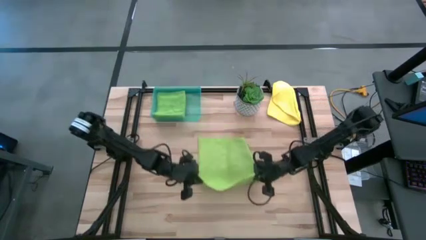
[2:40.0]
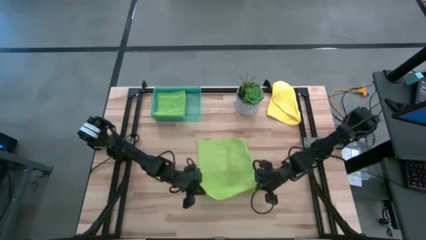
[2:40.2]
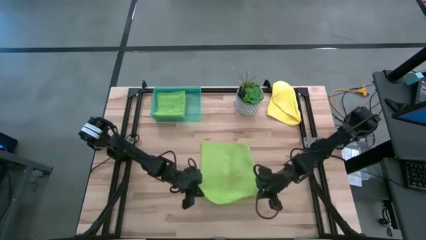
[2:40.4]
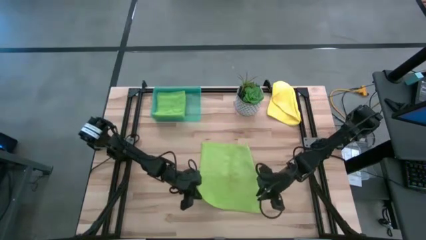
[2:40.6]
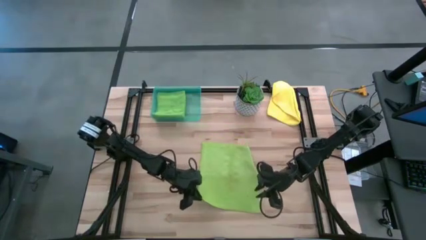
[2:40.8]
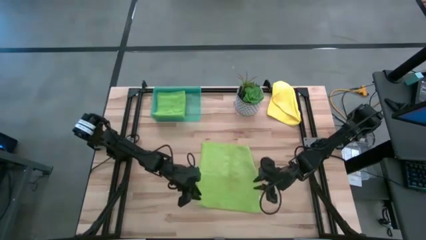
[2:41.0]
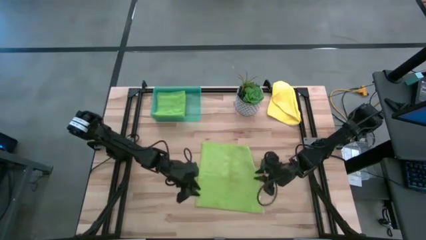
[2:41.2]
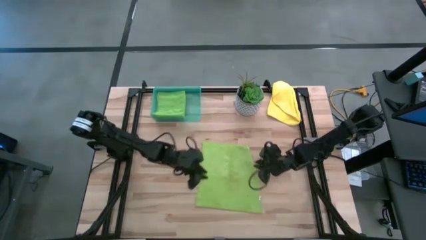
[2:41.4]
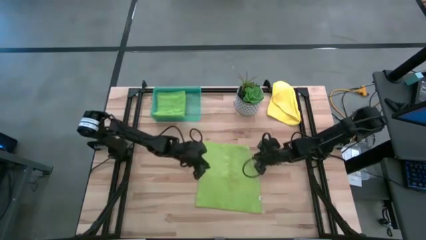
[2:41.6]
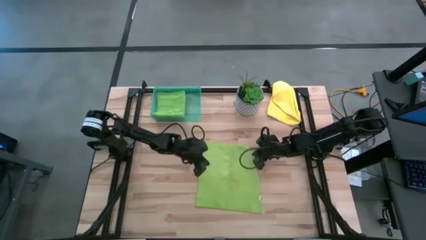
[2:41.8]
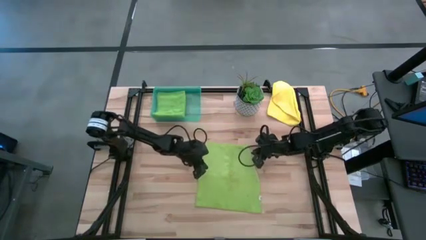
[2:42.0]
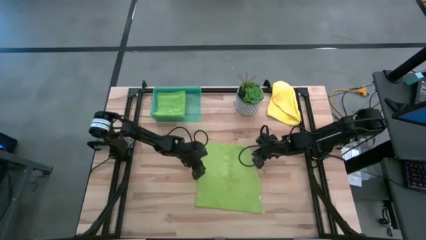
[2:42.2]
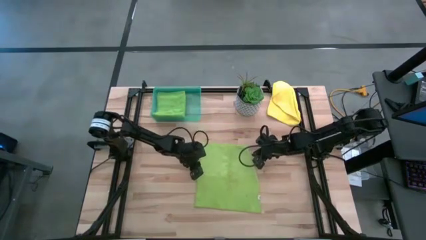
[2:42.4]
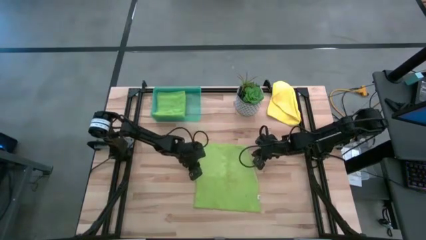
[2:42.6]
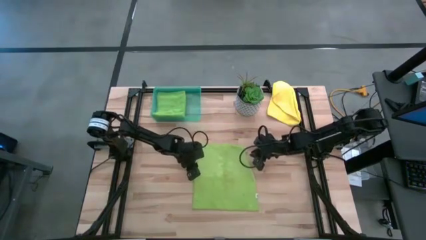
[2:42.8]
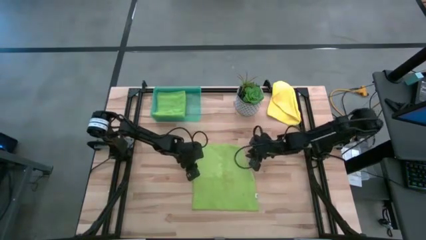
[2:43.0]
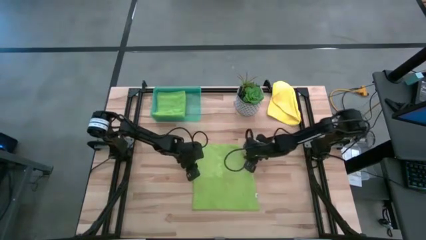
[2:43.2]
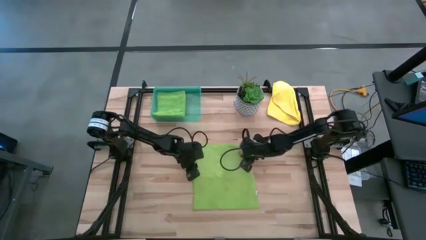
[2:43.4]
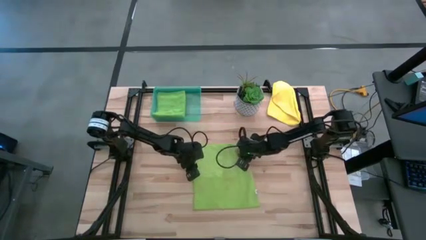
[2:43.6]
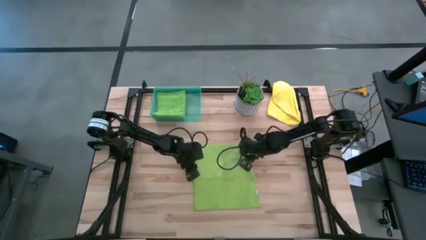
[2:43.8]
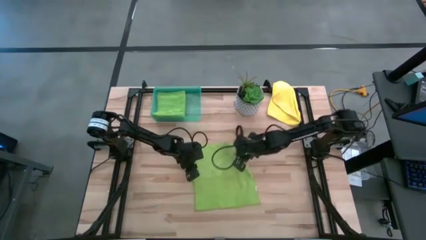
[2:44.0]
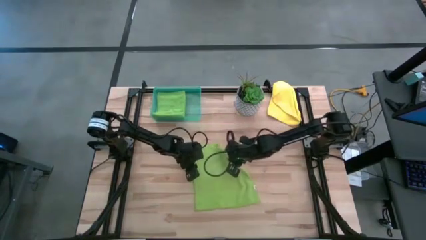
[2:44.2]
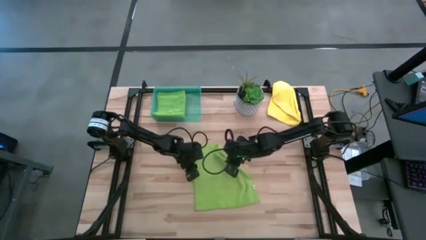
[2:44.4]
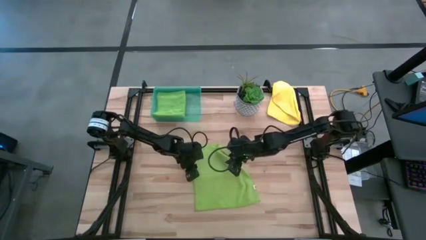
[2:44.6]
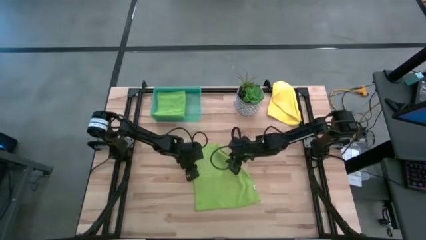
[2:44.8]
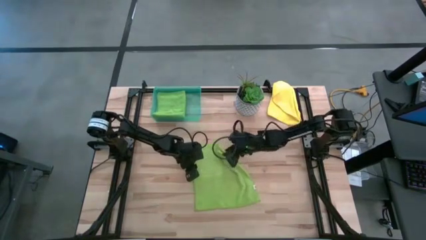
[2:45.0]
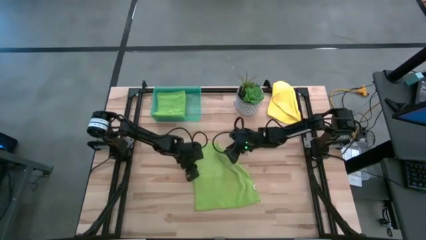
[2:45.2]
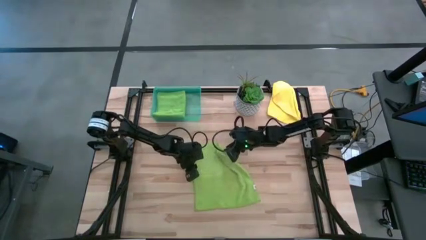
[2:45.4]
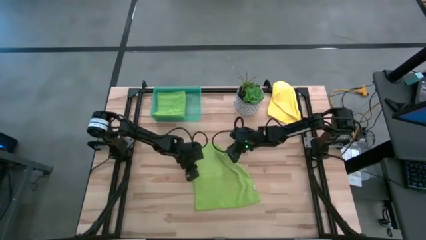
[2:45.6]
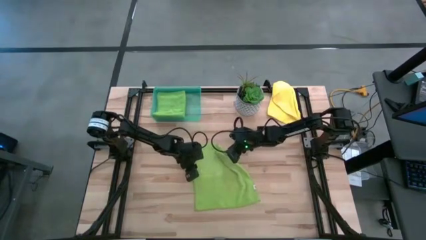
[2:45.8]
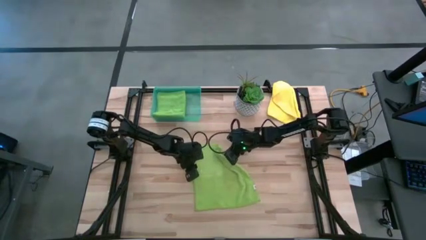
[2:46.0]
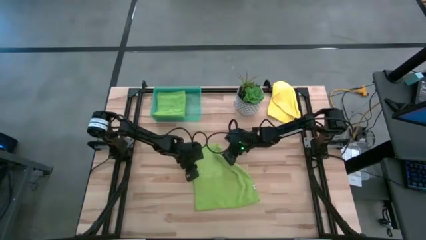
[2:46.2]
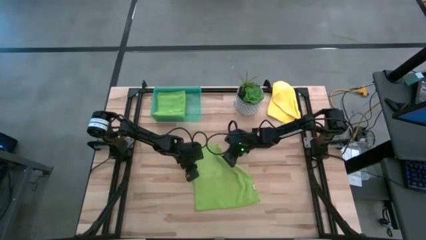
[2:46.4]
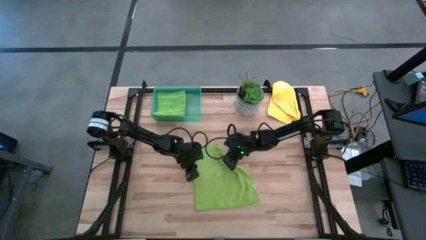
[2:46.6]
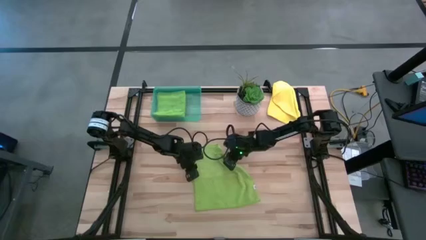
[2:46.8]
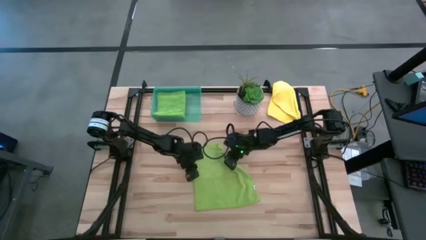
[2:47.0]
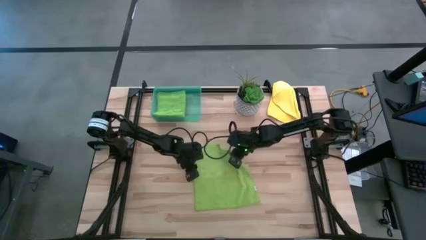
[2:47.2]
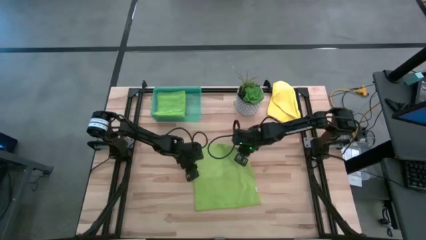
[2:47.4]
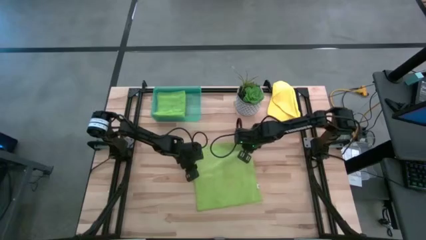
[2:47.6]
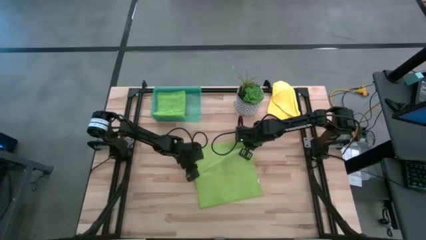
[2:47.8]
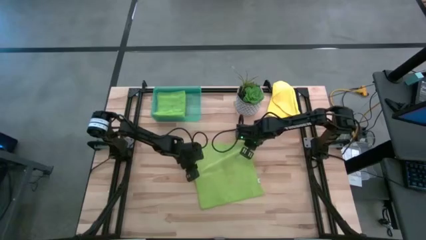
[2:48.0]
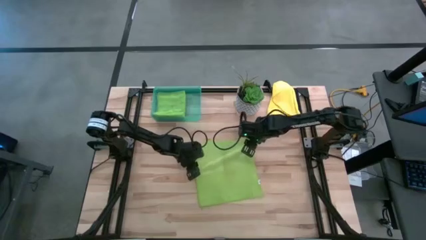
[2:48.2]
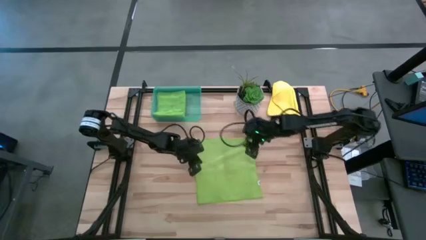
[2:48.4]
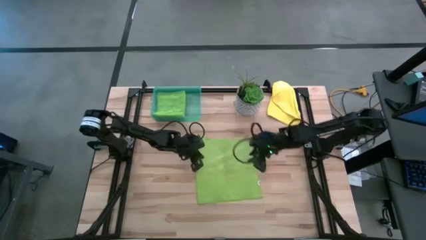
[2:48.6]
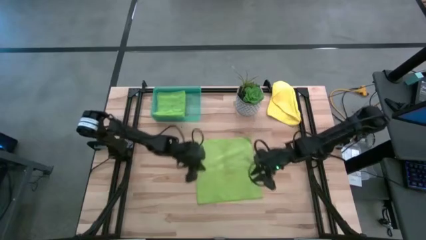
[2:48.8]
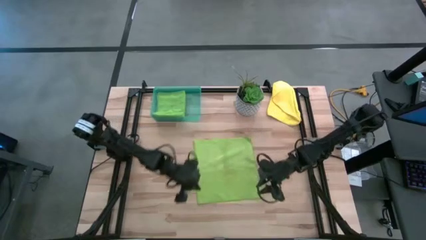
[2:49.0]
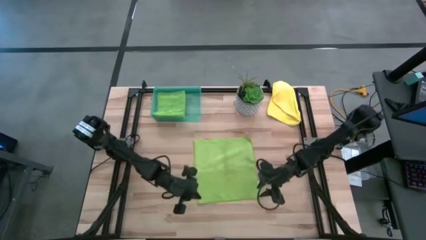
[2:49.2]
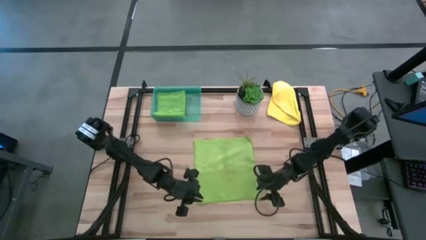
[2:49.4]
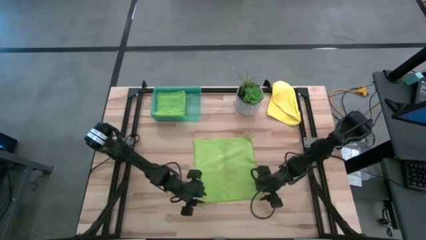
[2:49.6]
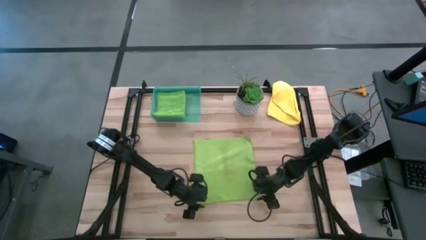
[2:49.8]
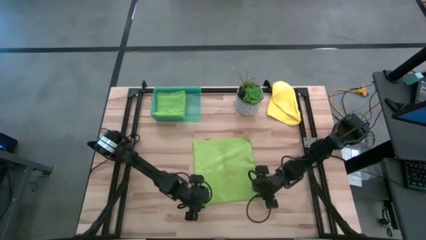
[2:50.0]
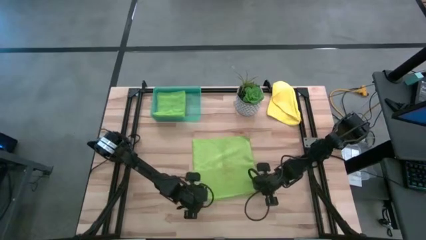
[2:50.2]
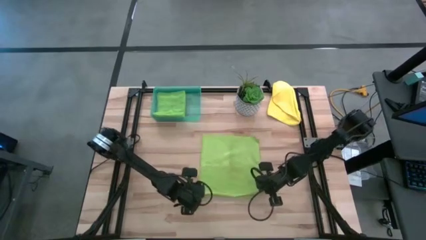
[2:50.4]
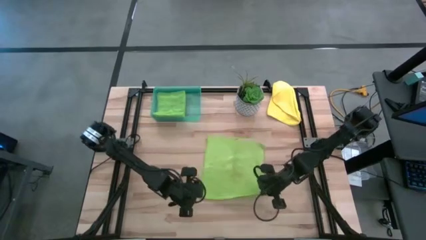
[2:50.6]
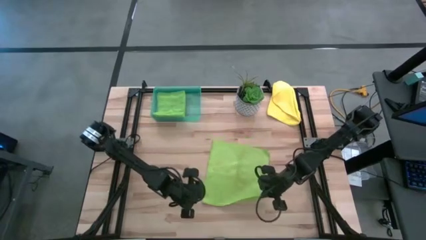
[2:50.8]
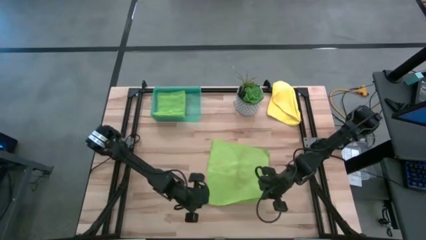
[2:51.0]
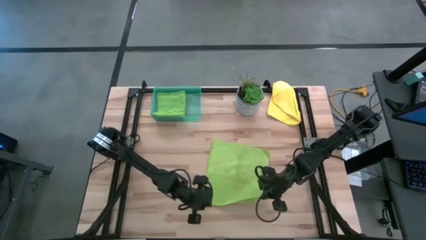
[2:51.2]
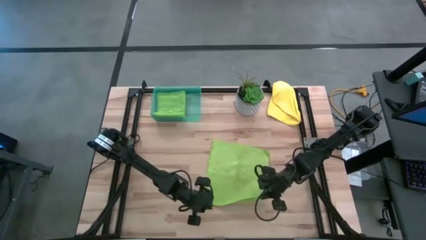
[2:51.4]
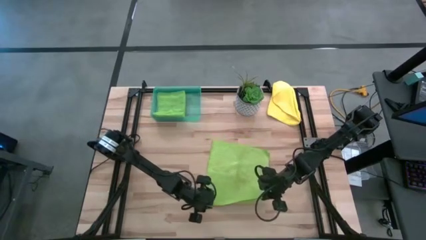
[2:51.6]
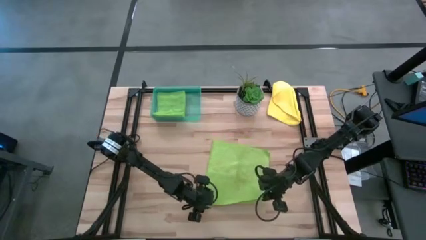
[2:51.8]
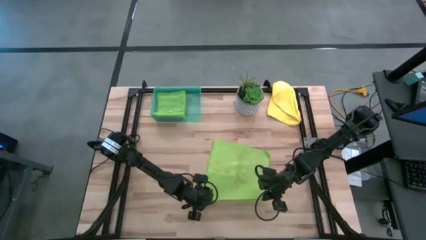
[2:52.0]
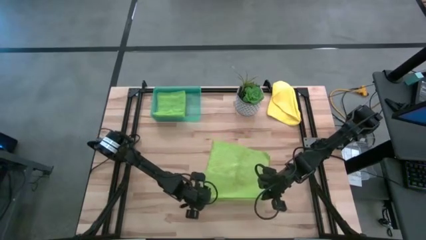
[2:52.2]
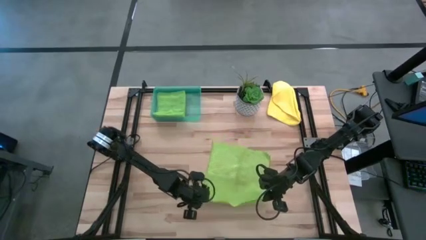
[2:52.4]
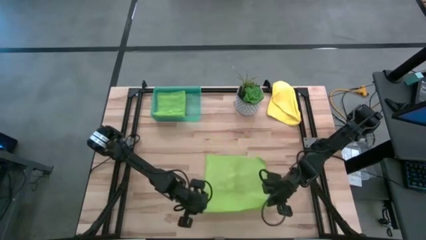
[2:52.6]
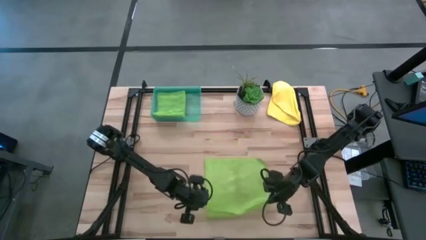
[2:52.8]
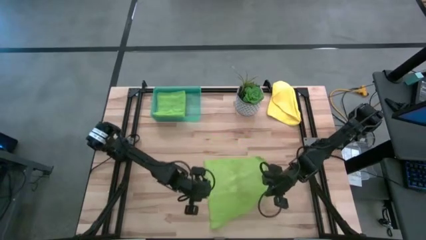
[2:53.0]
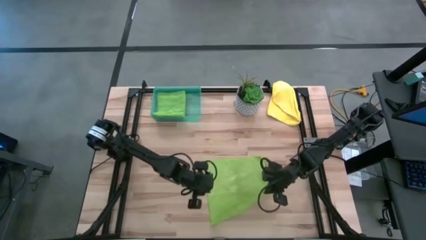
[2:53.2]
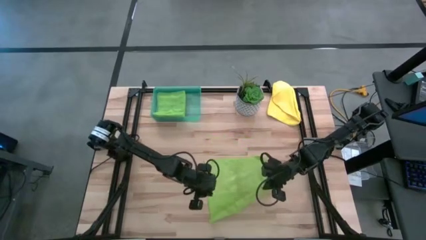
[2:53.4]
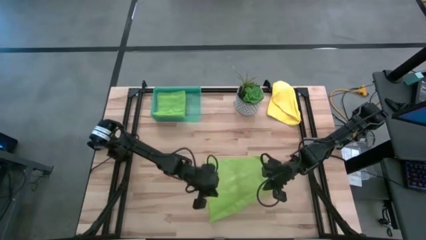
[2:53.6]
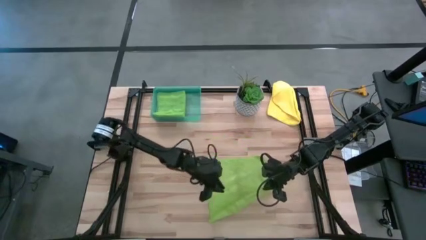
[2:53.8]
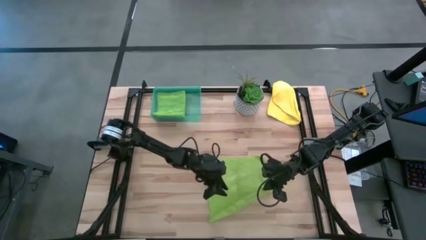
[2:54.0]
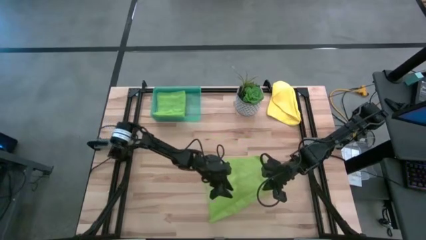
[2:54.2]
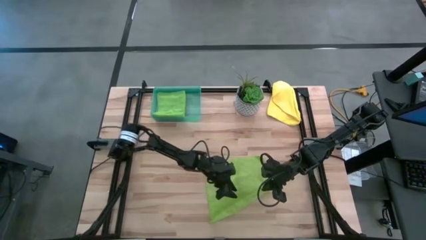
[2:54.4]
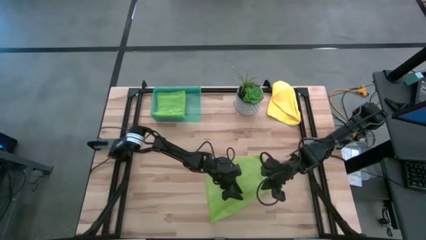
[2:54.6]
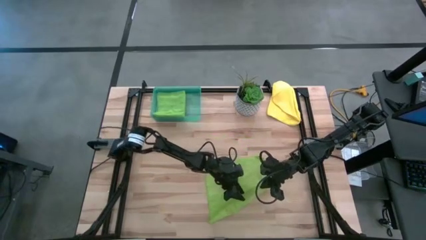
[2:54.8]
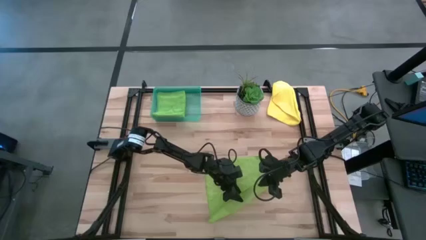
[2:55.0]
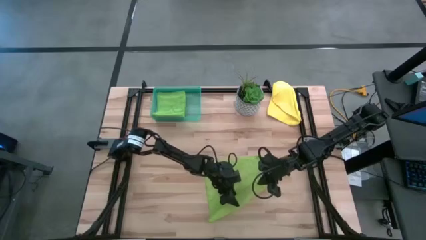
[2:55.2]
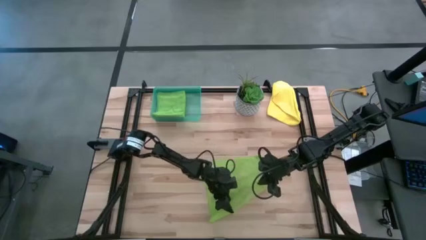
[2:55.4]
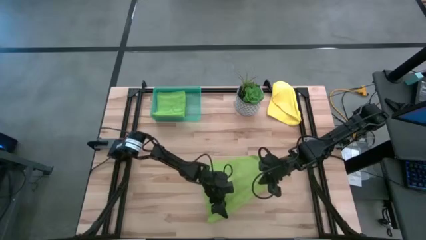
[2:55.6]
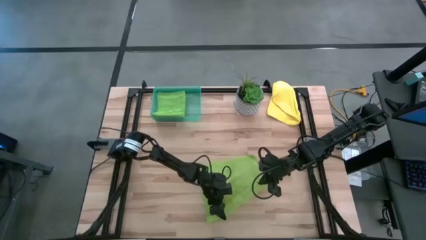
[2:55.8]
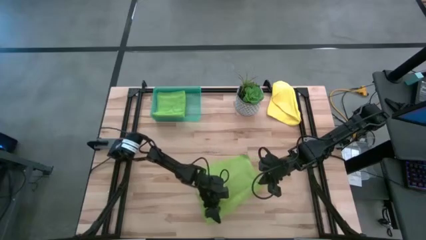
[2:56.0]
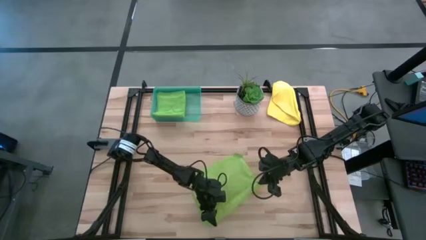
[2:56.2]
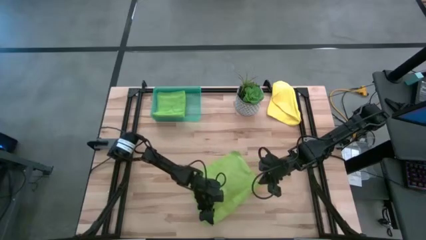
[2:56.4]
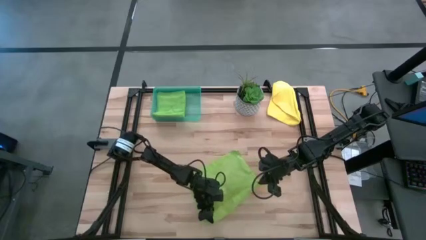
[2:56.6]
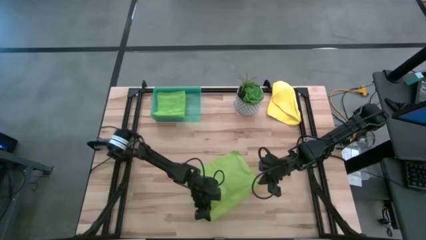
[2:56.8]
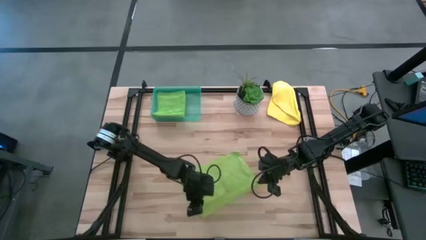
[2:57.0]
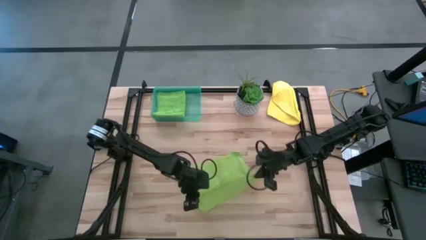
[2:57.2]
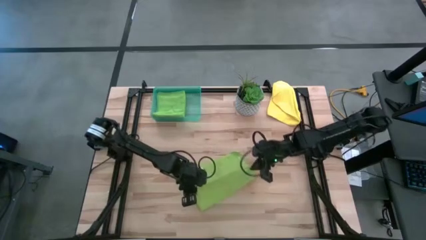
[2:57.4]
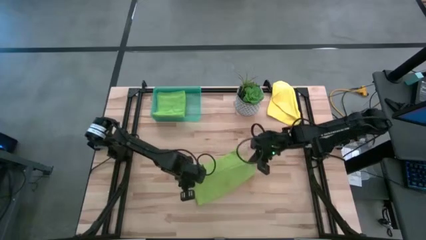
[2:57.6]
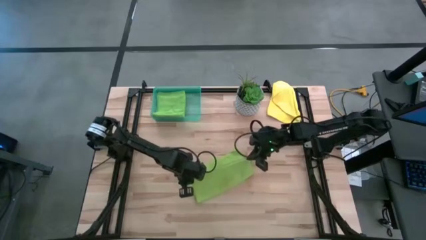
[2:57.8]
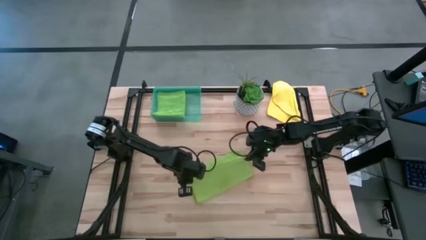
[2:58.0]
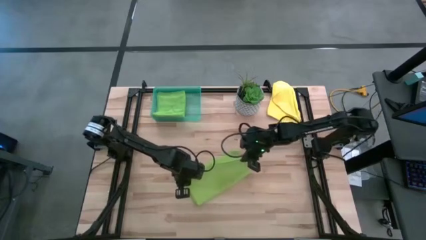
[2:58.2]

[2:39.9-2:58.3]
Task: Fold microfiber towels
Fold the yellow-green microfiber cloth
